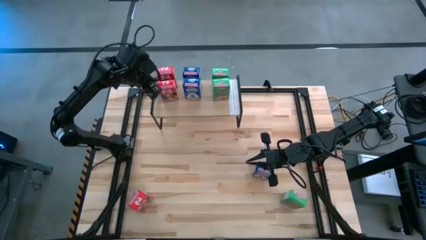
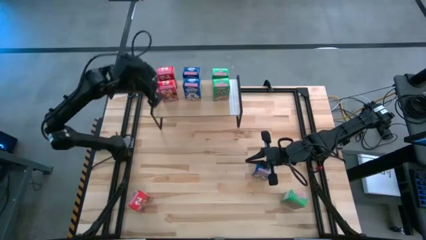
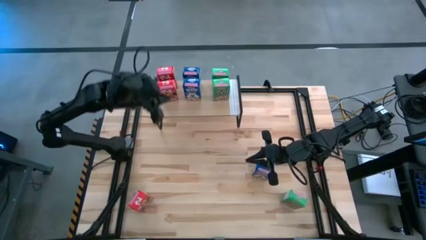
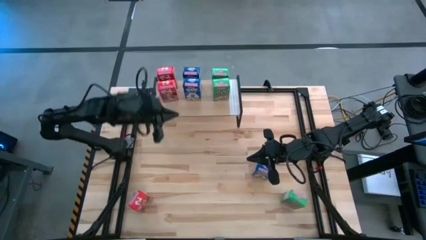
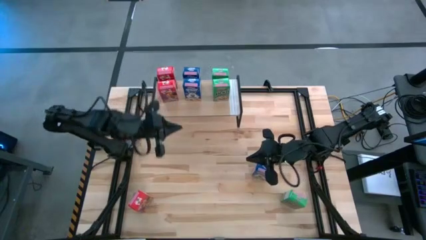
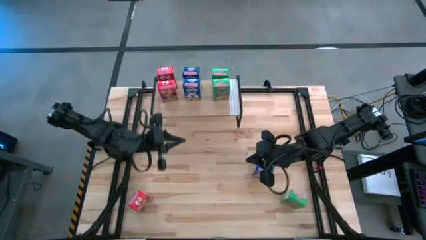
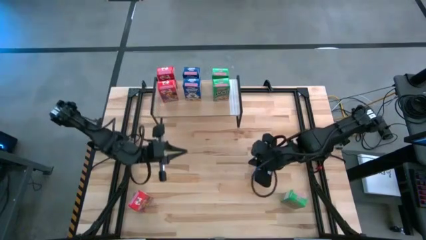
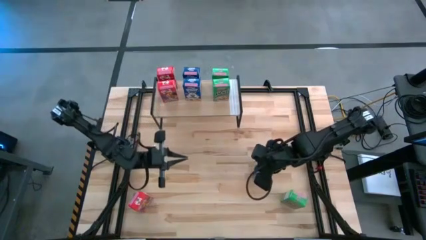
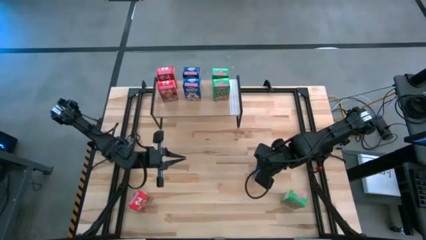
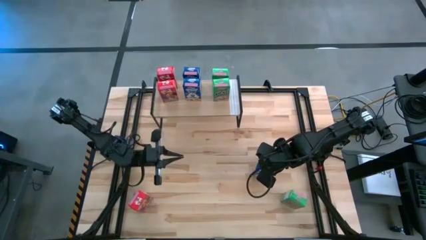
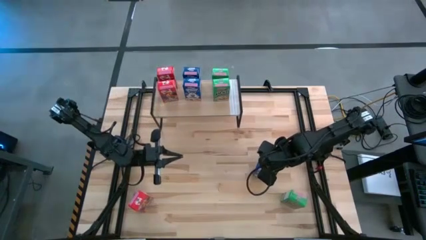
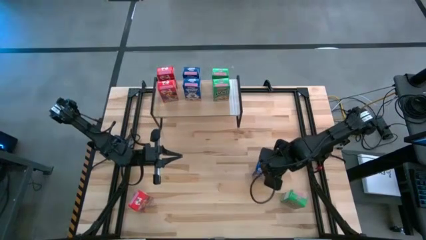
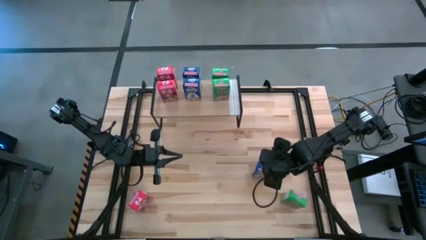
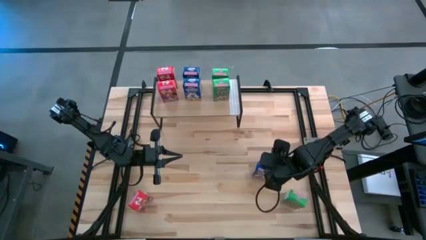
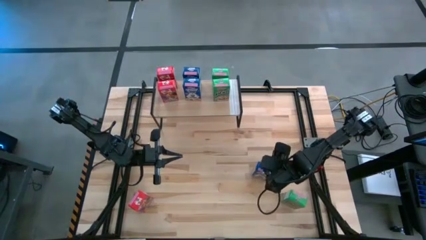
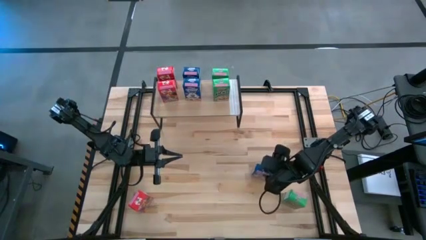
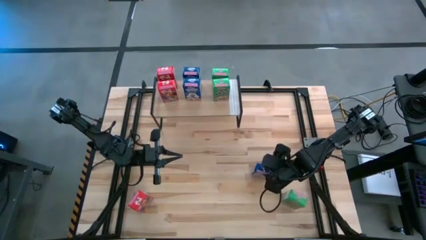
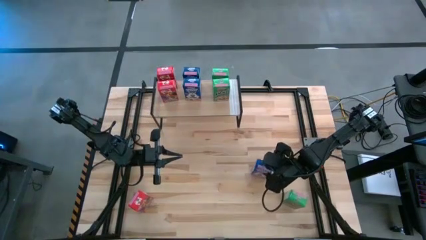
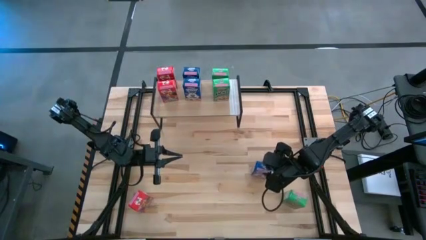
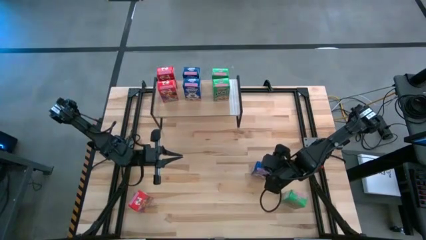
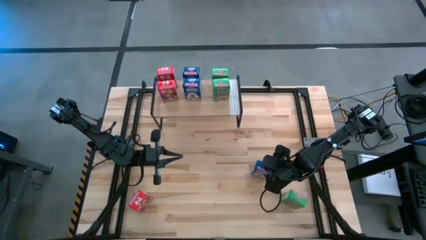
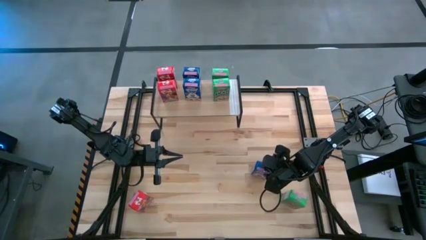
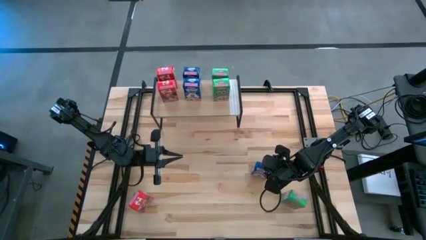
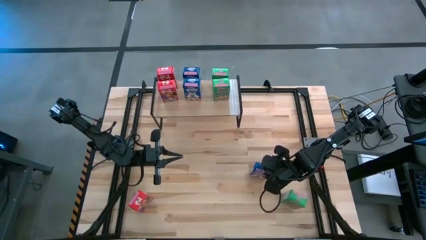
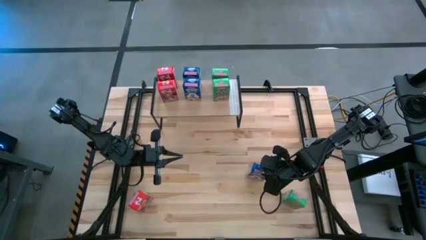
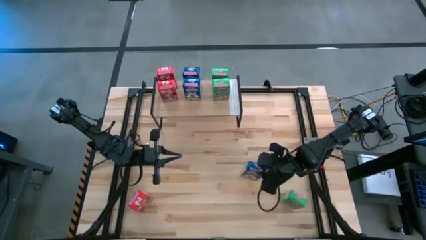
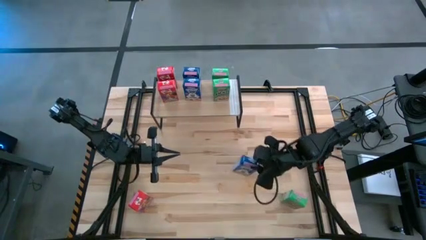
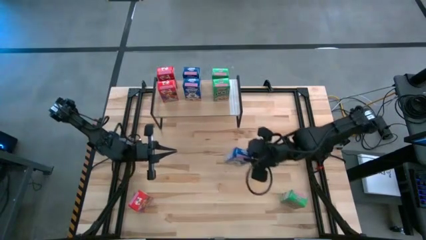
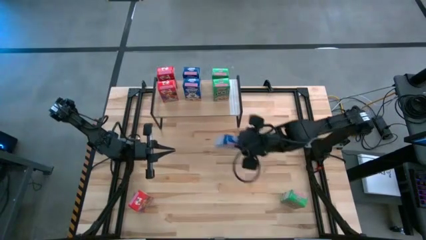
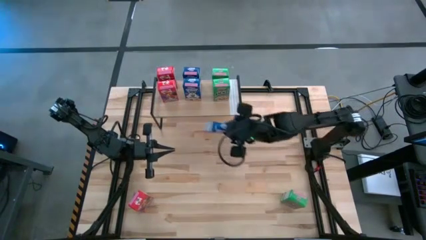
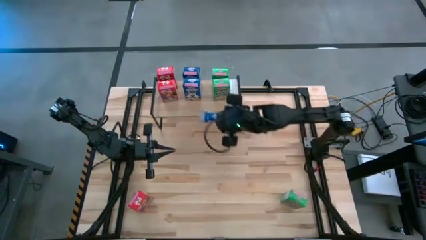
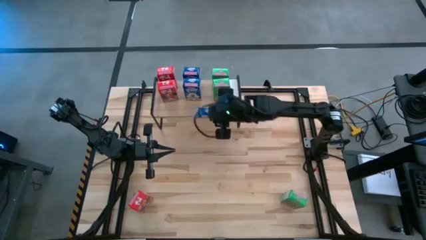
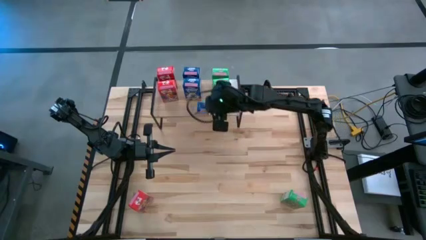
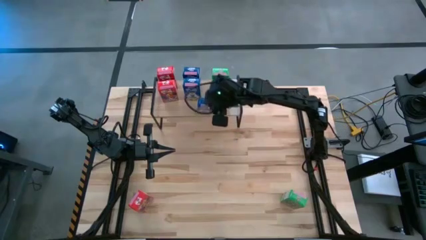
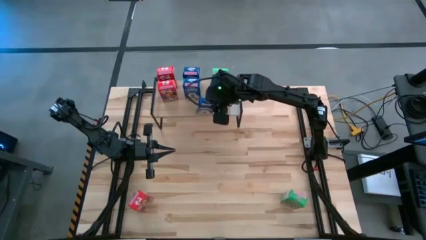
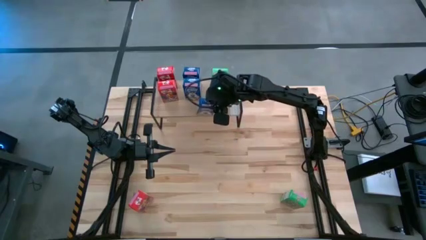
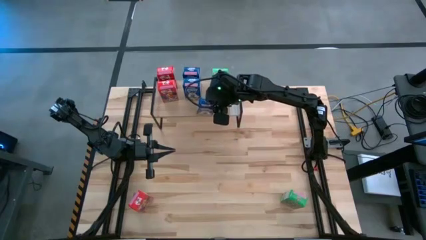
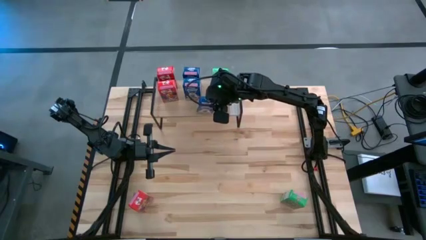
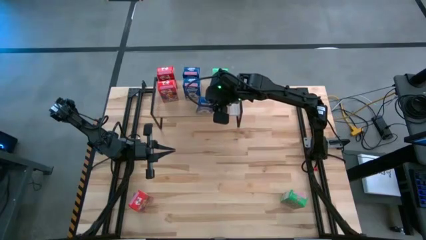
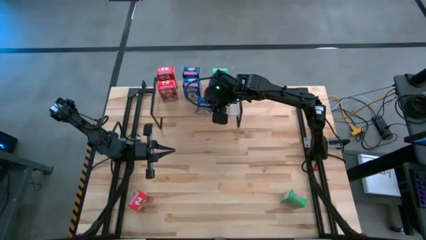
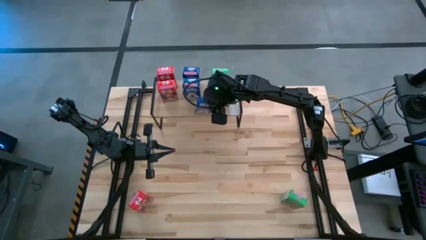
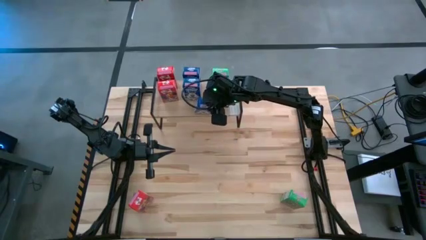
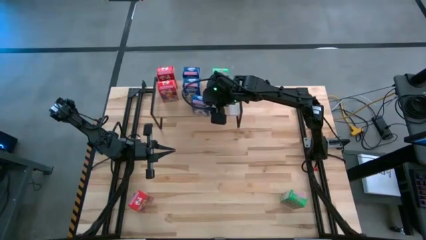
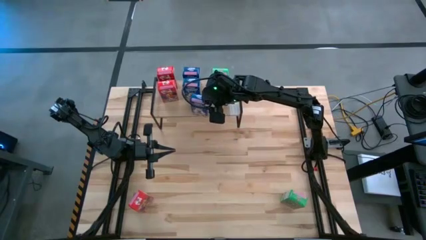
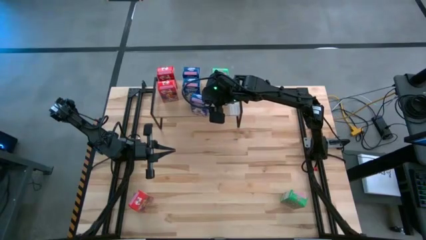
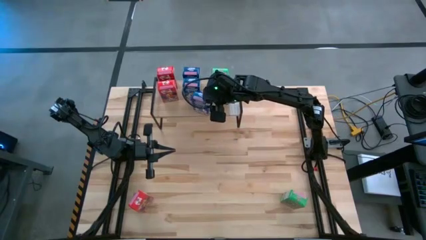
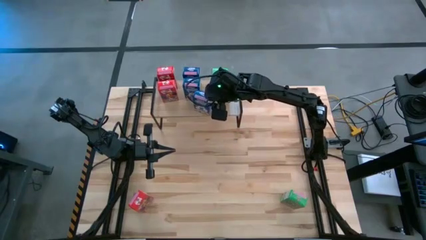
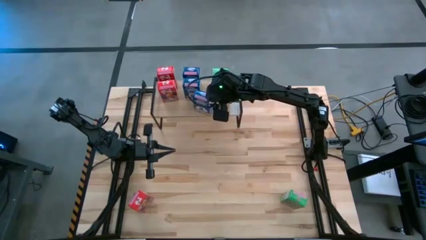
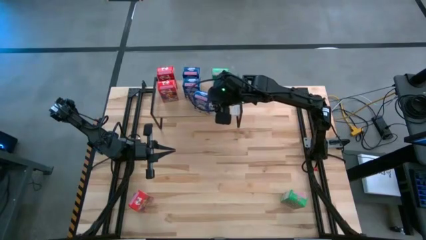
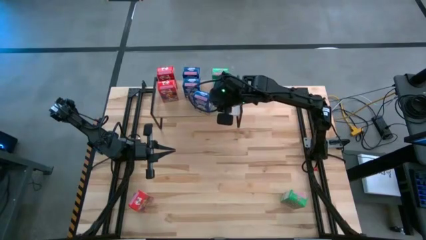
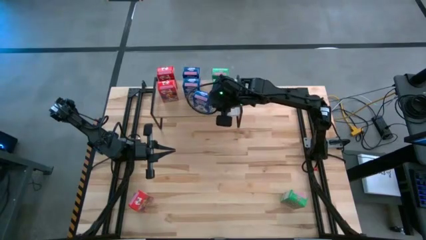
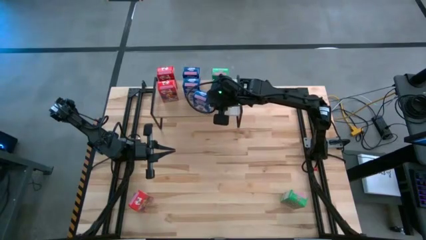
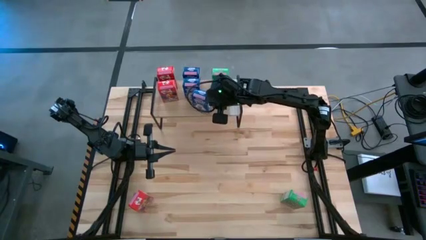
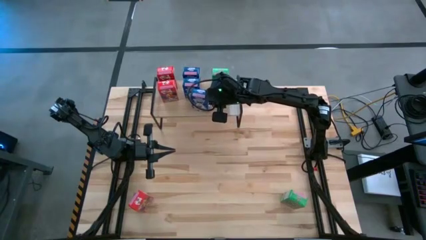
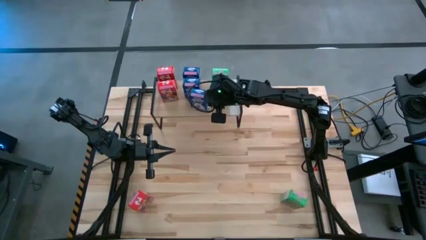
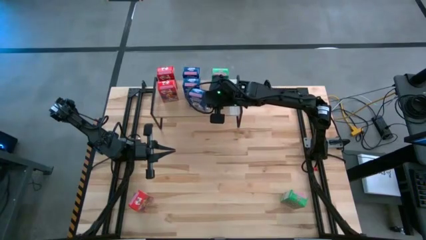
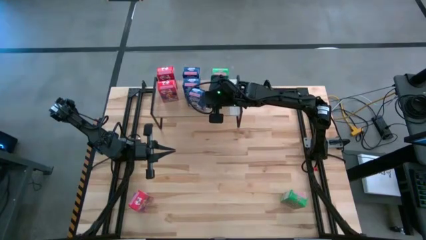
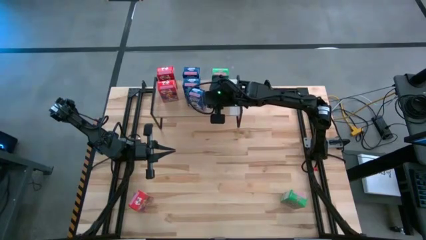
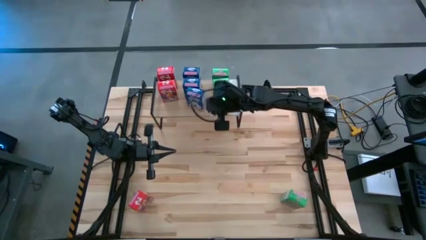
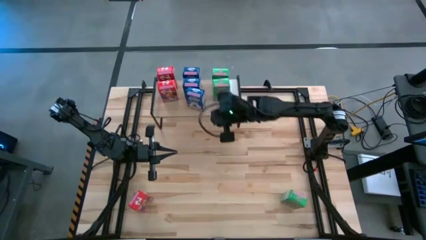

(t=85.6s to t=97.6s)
Task: Stack cereal on shelf
Put the blue cereal box on the shelf aligned with the blue cereal boxes

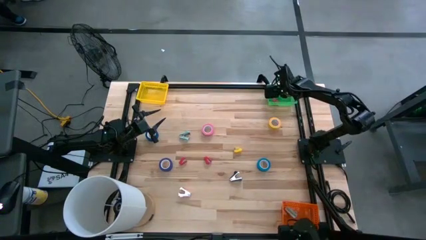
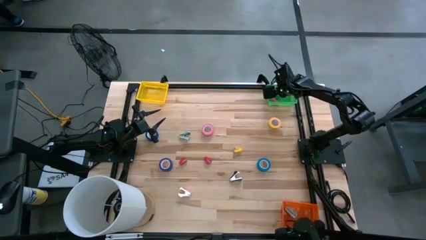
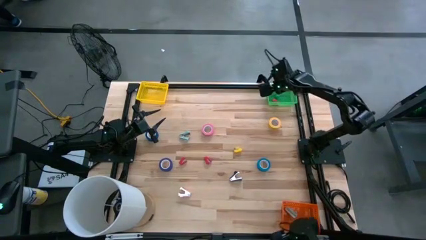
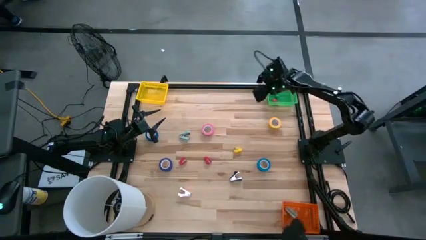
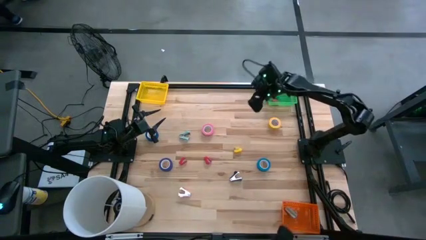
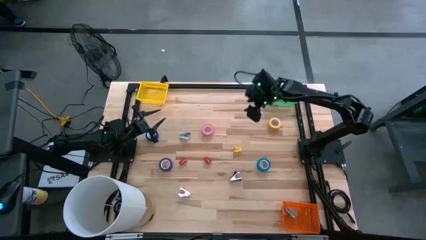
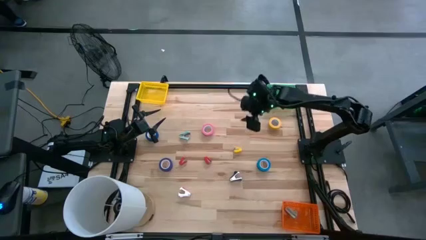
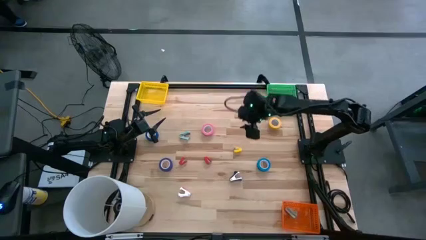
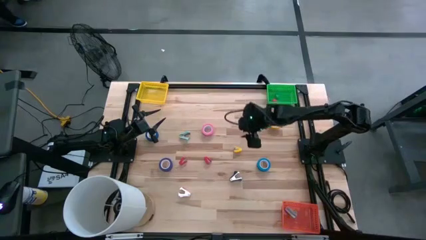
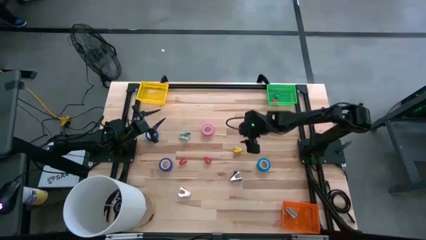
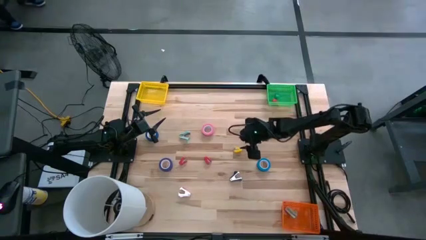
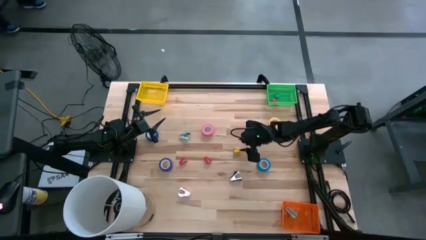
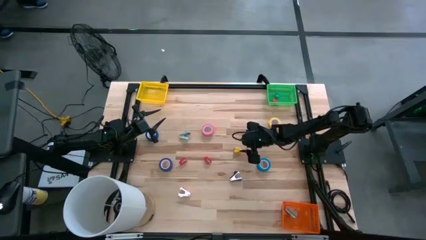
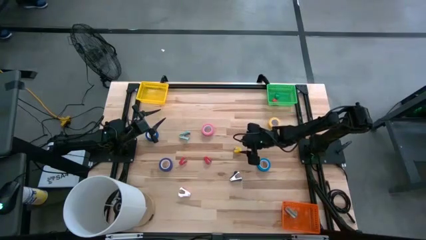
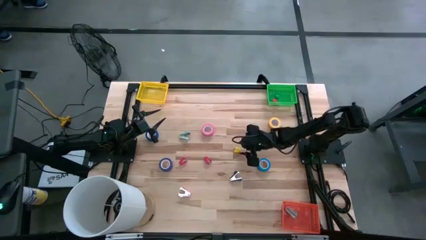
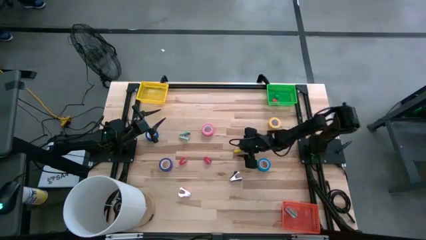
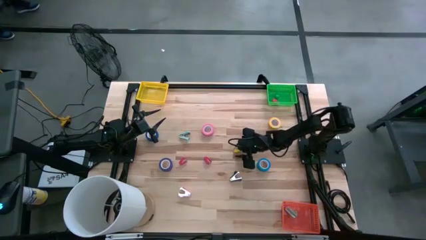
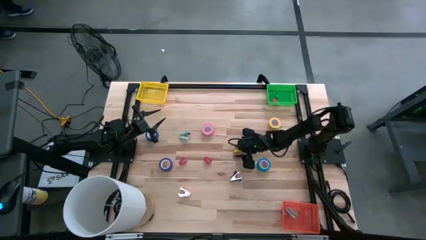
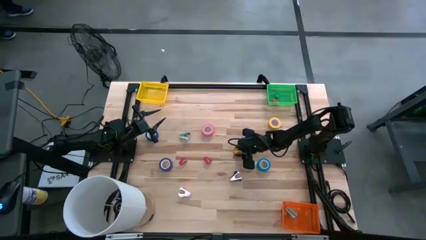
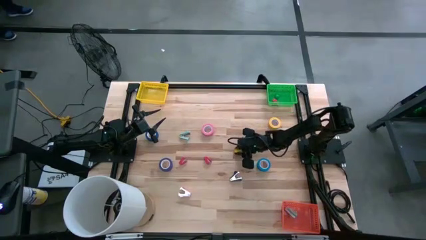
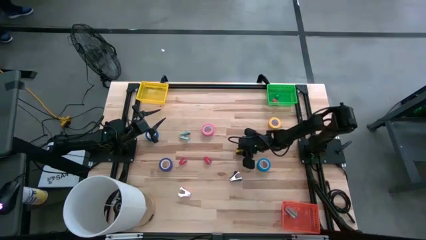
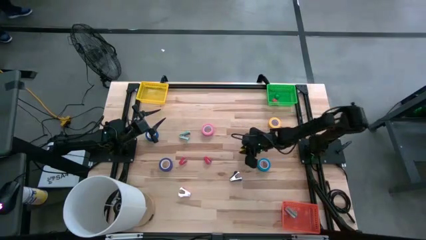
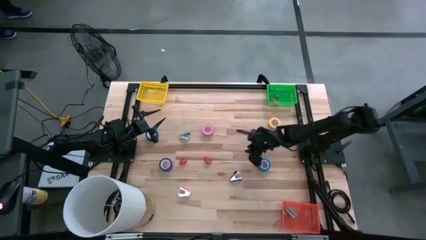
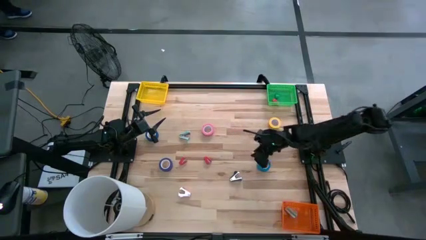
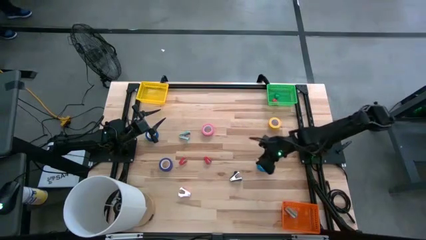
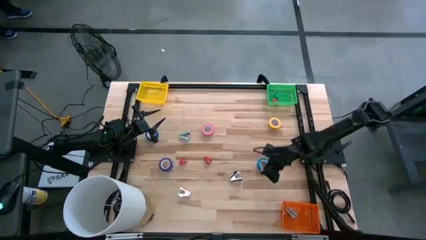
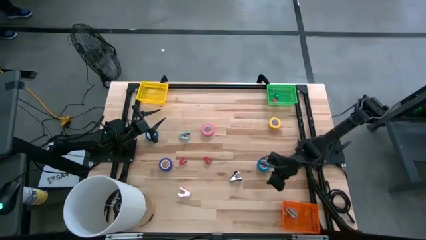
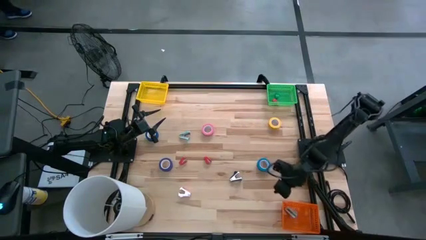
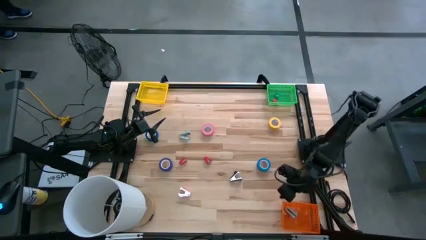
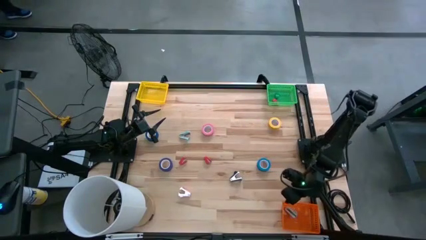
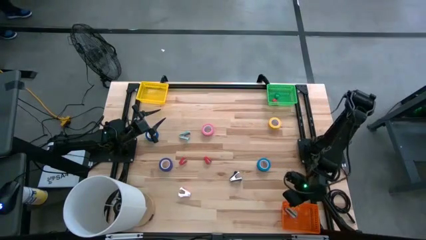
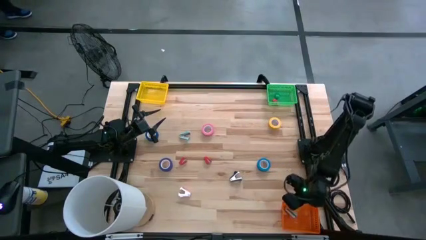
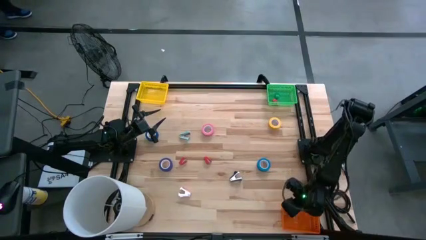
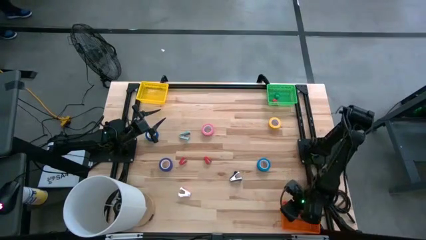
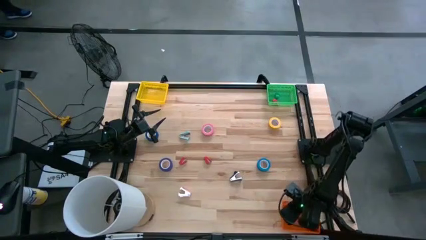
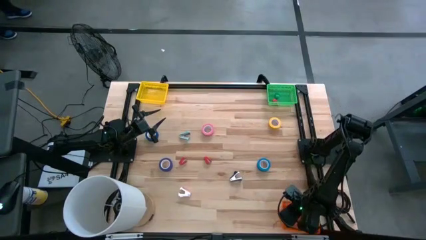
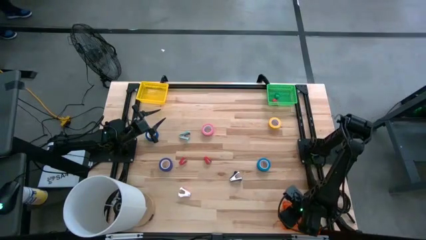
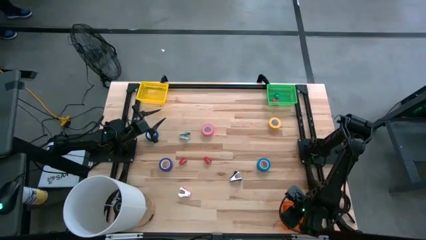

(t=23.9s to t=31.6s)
Task: Pick and place Stapler, Stapler remover, tape
Put the yellow stapler into the green bin
